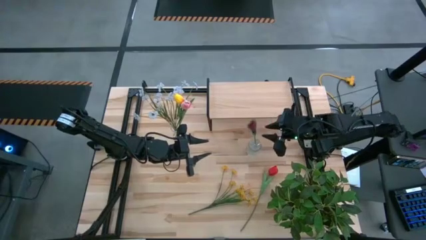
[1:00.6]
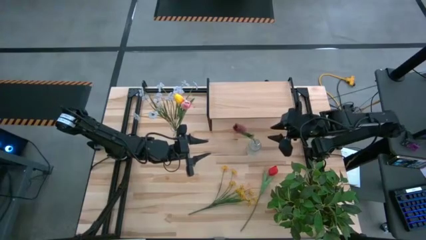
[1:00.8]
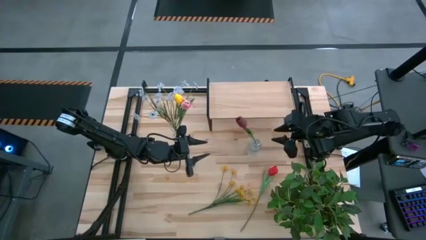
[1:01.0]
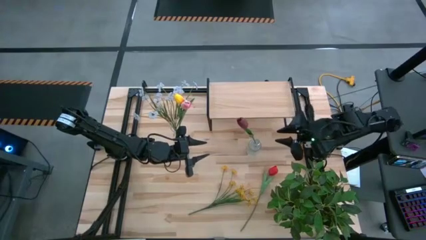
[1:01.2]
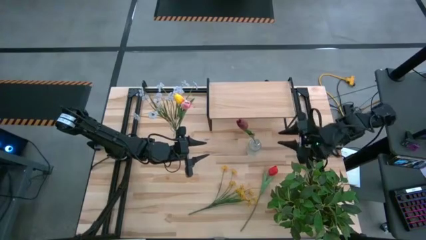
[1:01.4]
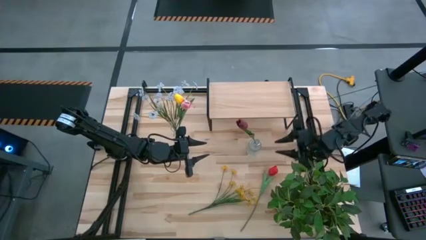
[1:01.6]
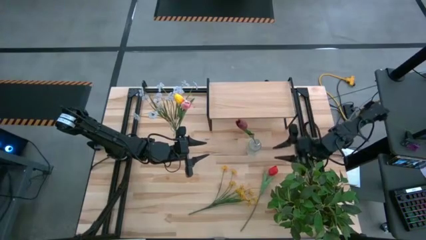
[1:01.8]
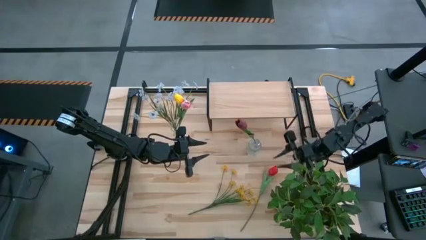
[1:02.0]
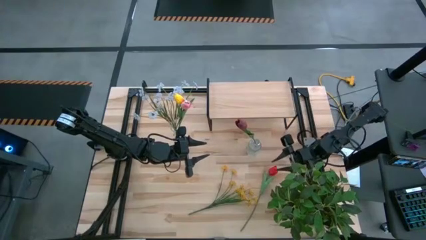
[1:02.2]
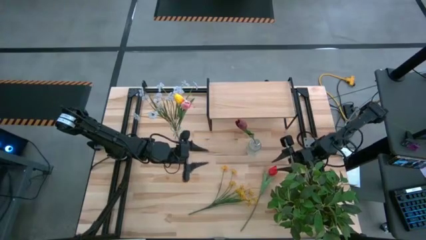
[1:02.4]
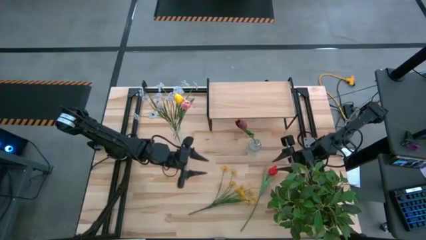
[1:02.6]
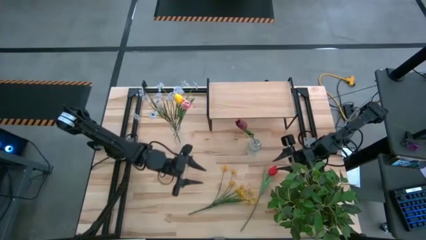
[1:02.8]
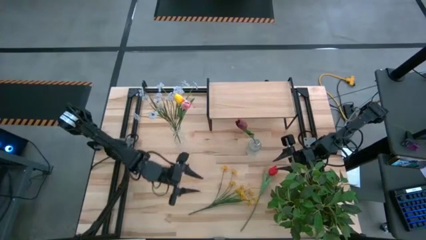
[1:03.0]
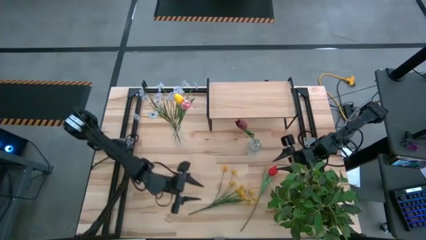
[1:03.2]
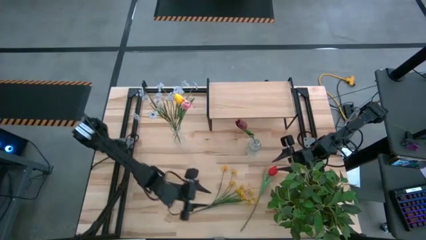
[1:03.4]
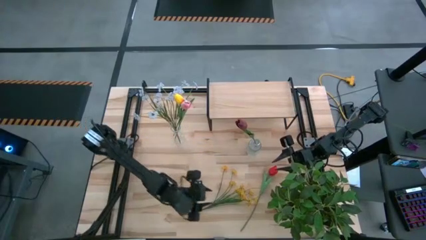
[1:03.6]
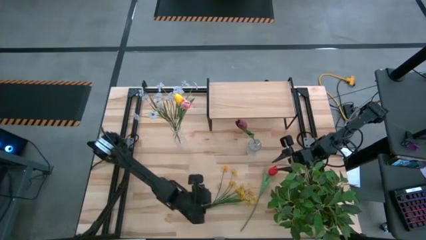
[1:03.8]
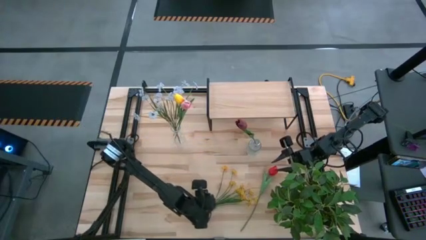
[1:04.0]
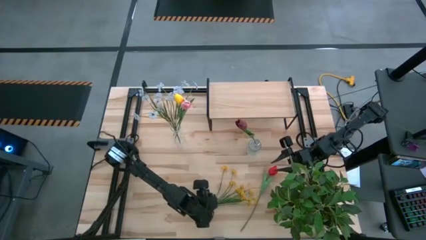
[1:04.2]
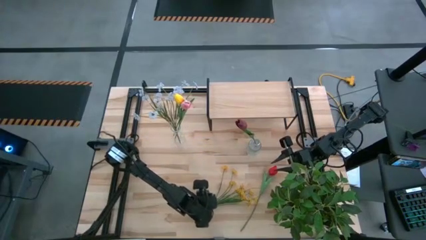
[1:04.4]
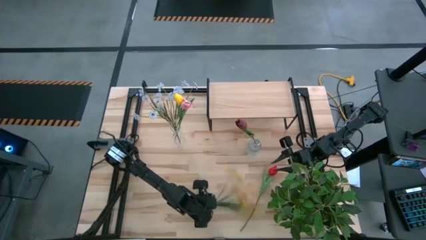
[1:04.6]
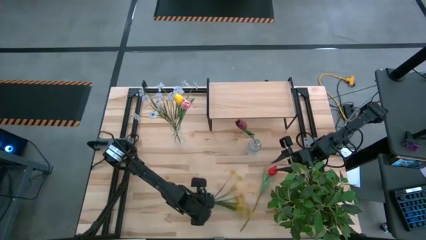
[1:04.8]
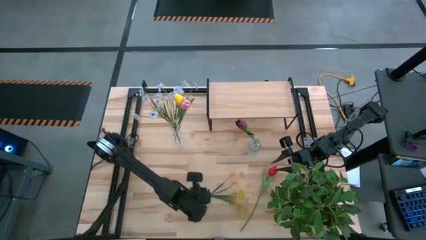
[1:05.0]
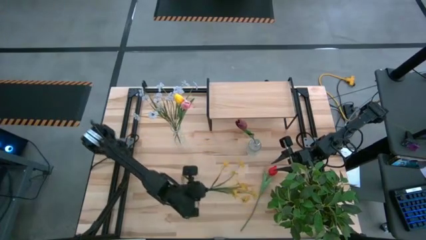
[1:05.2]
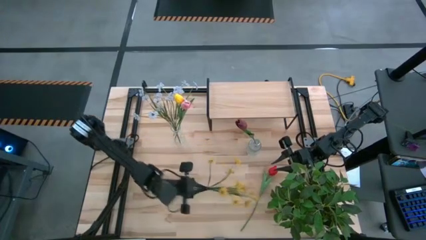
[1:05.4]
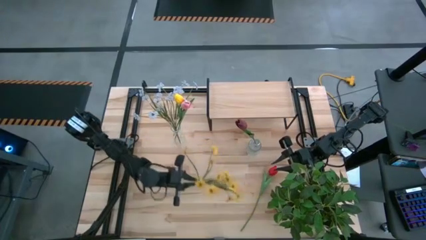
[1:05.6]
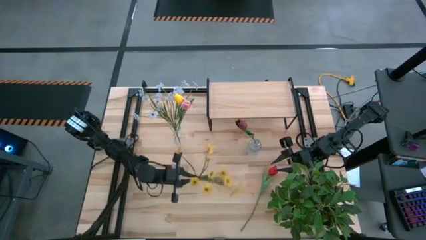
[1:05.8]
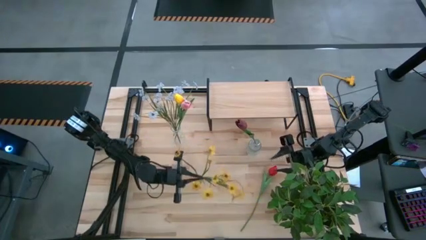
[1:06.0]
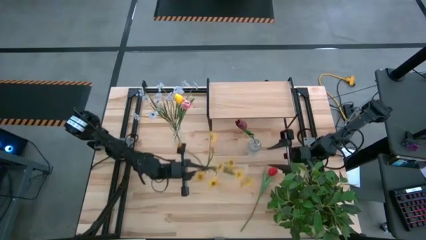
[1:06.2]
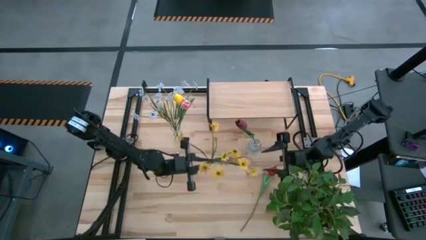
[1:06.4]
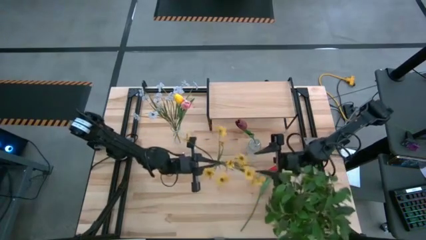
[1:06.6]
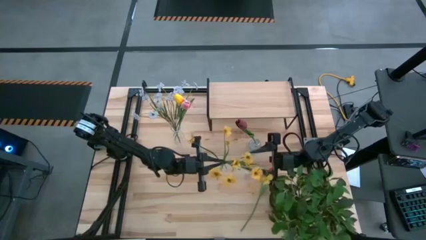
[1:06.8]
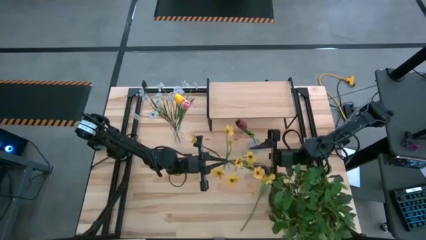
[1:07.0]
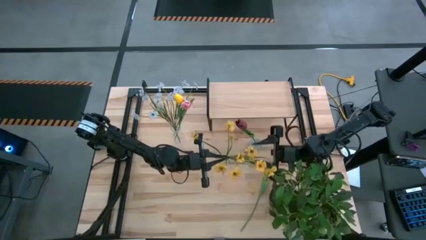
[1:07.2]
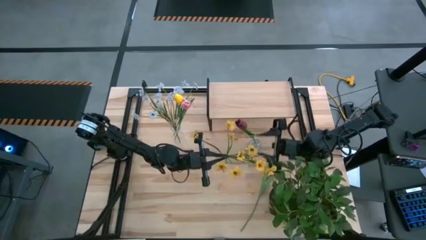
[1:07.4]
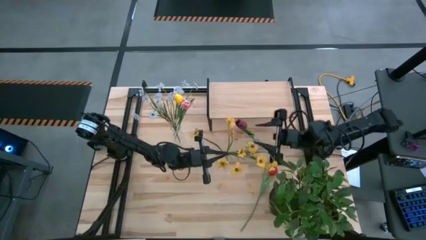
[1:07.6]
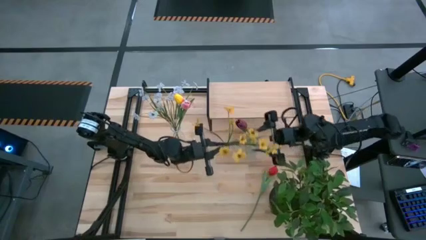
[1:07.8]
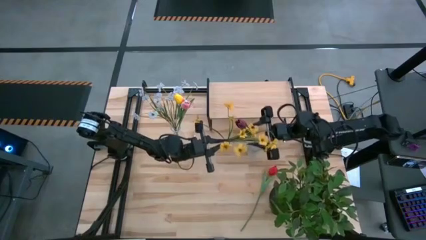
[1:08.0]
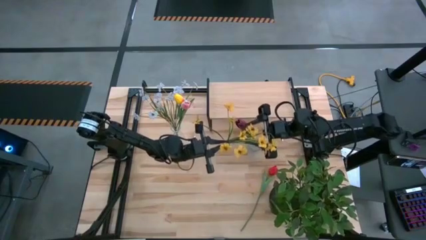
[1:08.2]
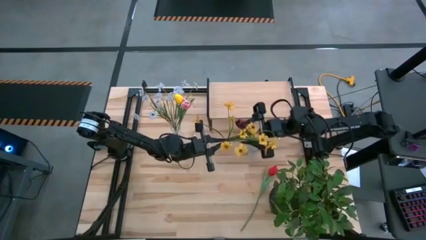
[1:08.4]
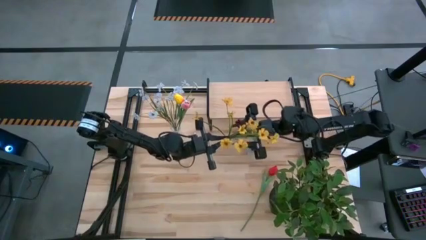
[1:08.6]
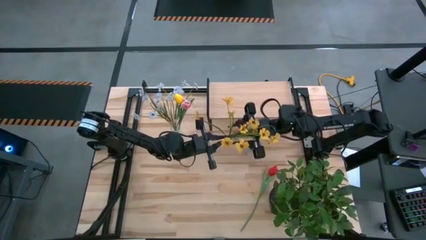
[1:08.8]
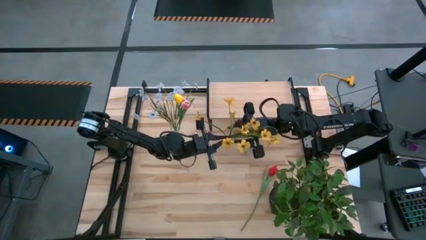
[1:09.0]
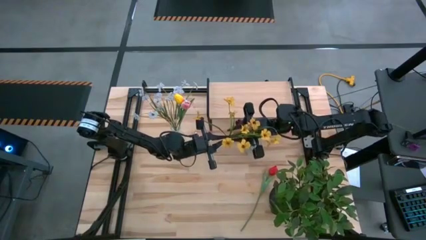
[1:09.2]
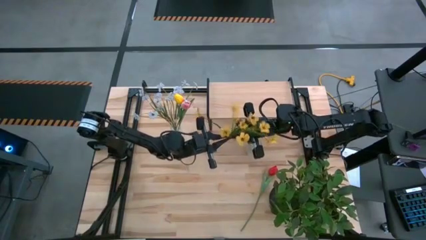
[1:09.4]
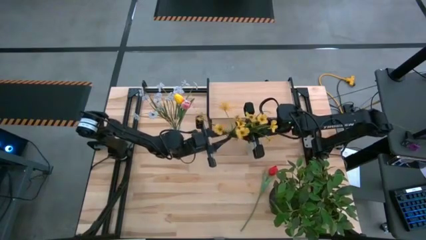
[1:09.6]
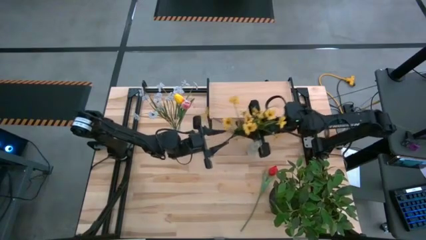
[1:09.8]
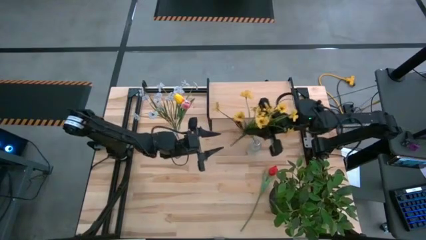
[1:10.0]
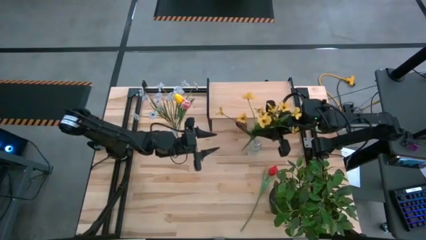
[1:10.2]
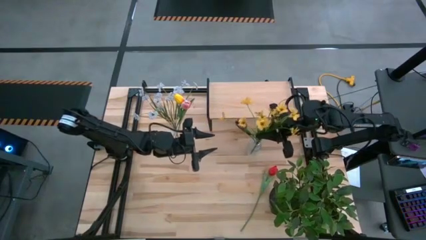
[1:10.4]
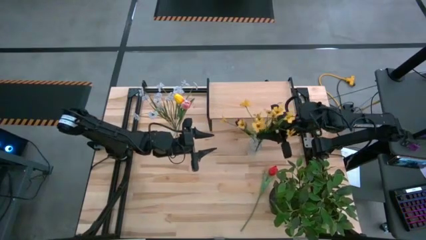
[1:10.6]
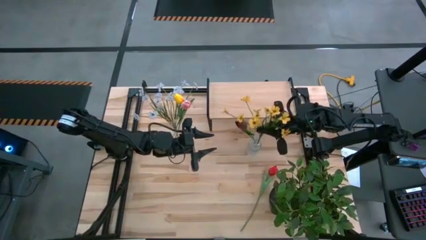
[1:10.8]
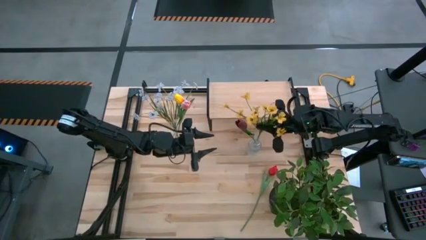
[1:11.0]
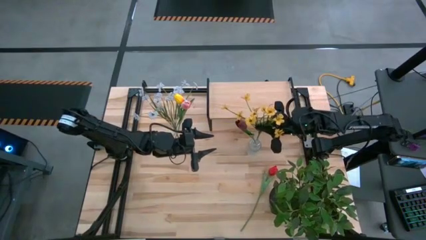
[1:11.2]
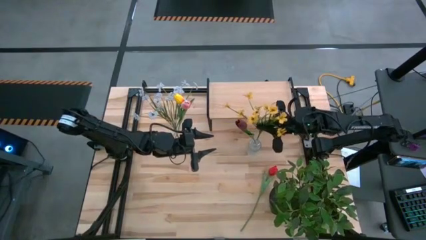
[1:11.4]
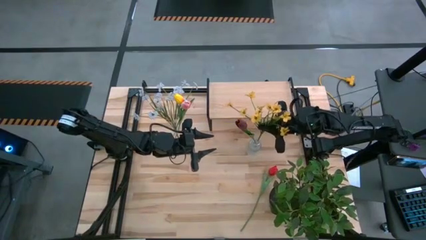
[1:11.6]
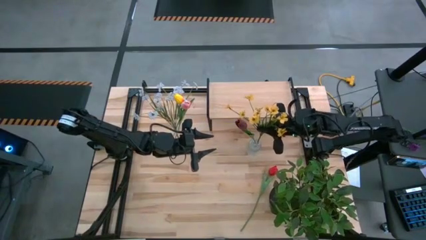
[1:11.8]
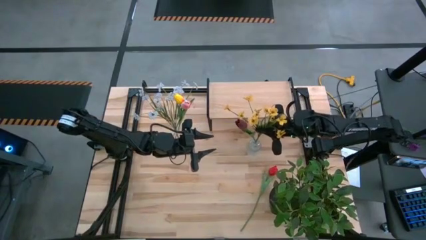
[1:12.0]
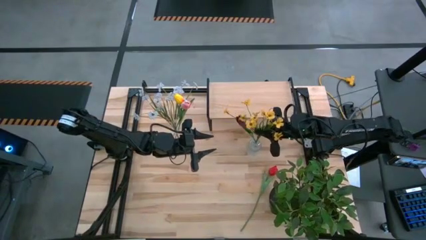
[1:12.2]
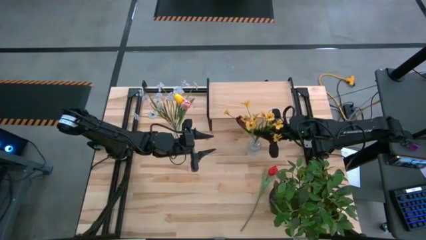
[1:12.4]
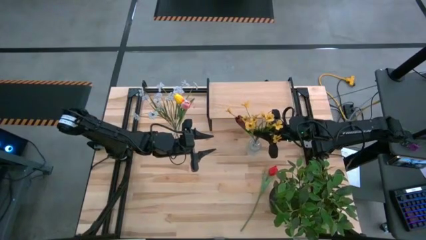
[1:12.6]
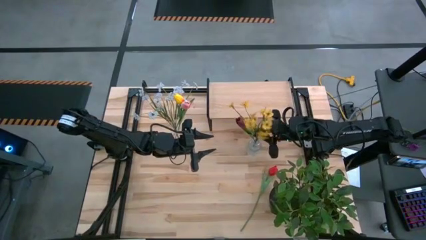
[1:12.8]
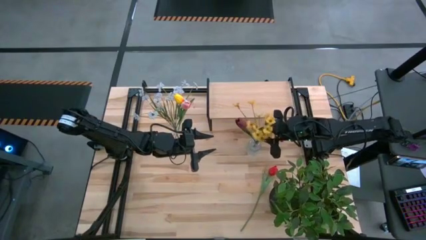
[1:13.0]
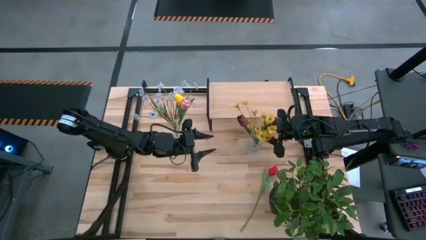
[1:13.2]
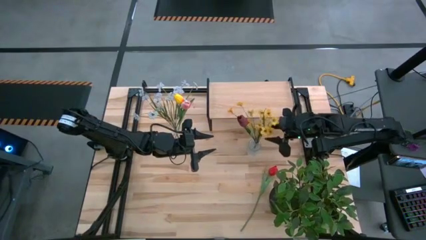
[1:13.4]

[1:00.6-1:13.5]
Task: Pick and place flowers into a vace then onto a shelf
Put the yellow flowers into the right transparent vase

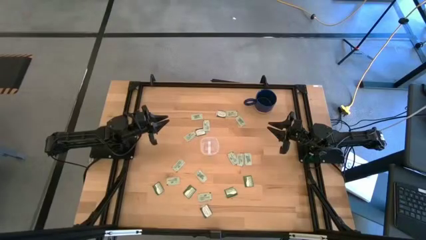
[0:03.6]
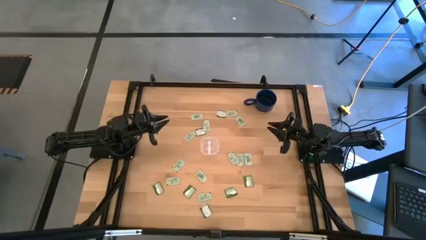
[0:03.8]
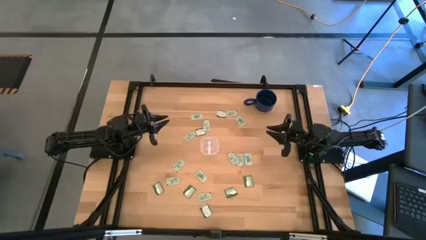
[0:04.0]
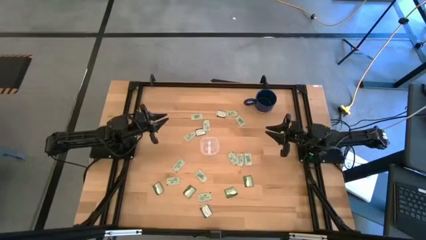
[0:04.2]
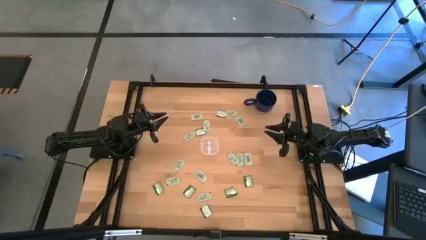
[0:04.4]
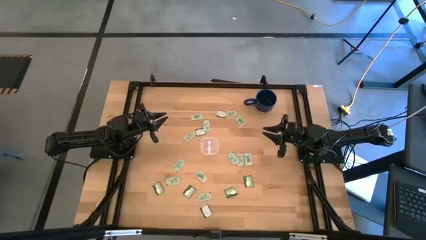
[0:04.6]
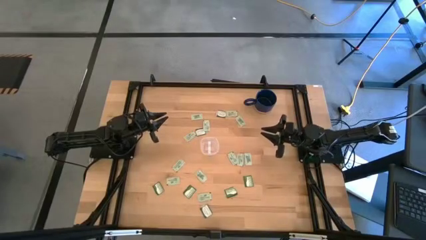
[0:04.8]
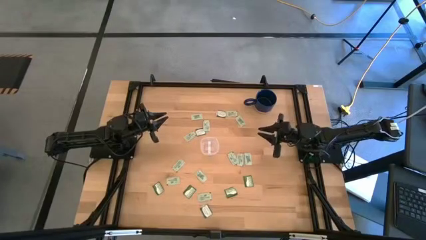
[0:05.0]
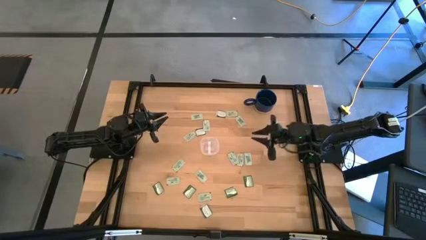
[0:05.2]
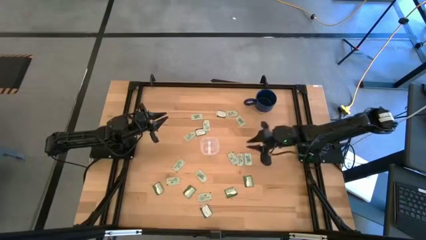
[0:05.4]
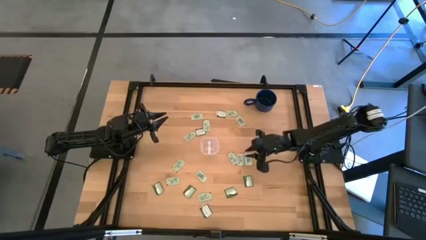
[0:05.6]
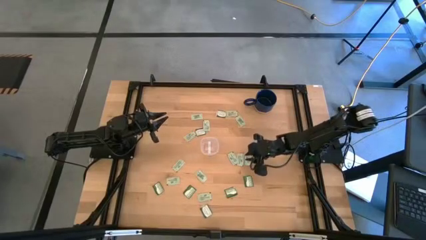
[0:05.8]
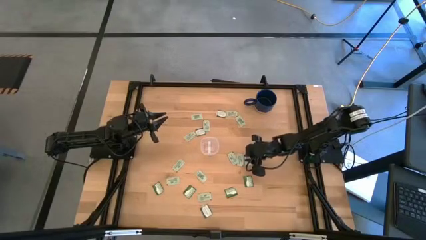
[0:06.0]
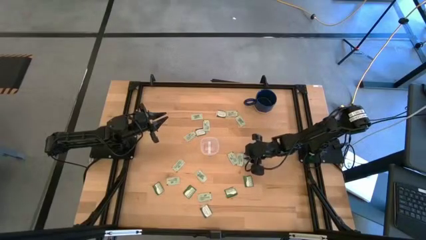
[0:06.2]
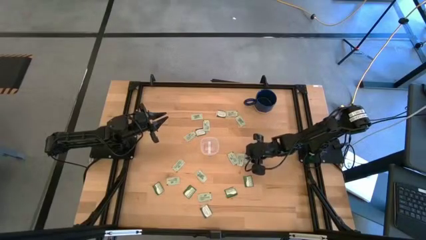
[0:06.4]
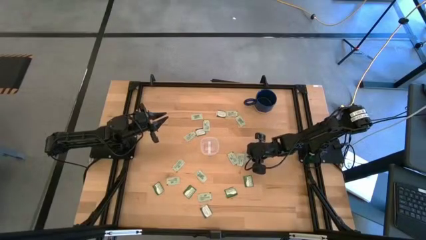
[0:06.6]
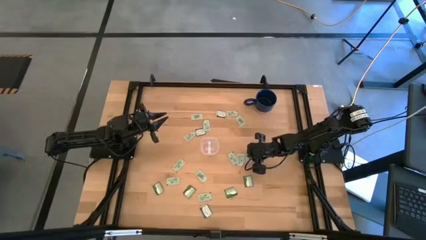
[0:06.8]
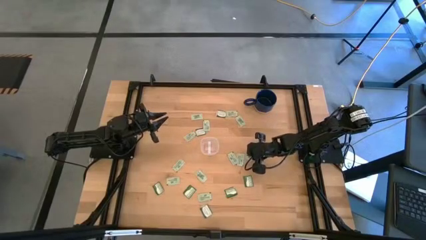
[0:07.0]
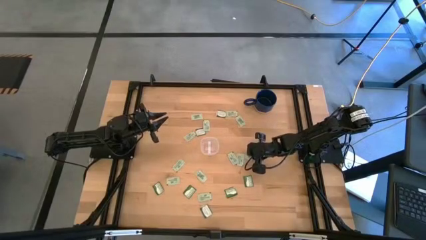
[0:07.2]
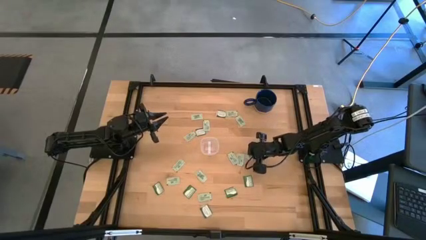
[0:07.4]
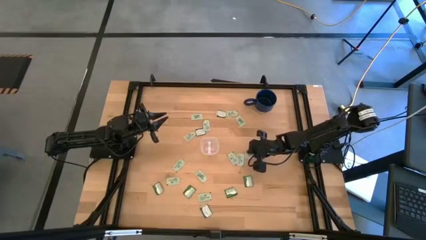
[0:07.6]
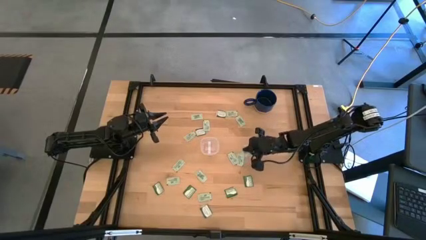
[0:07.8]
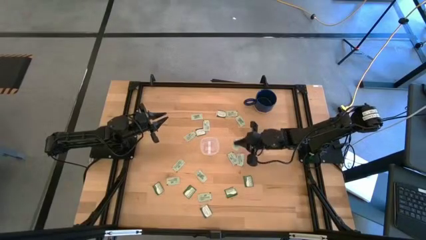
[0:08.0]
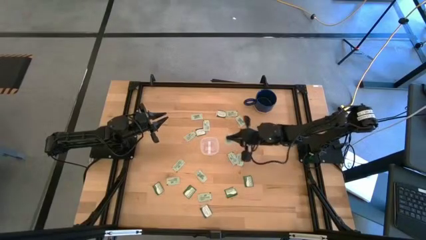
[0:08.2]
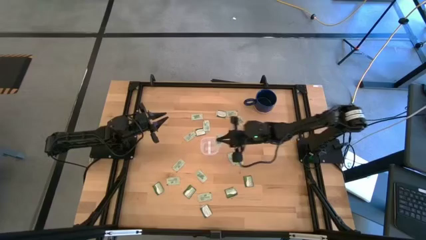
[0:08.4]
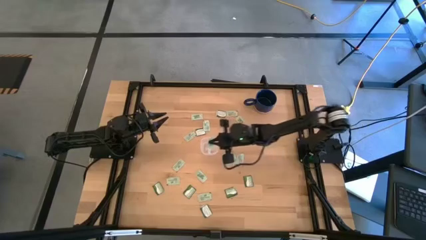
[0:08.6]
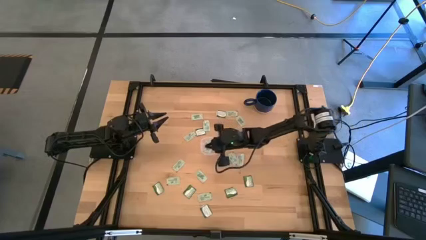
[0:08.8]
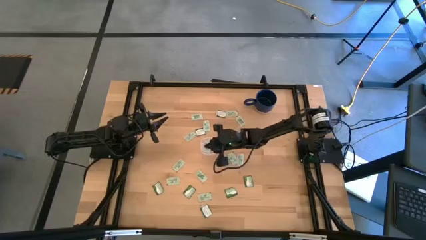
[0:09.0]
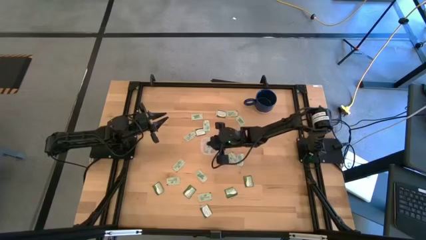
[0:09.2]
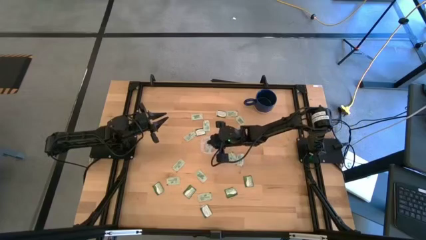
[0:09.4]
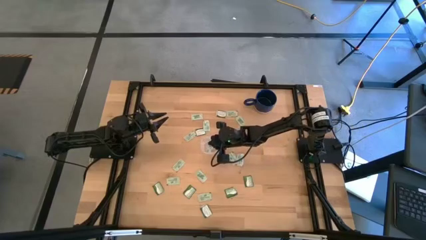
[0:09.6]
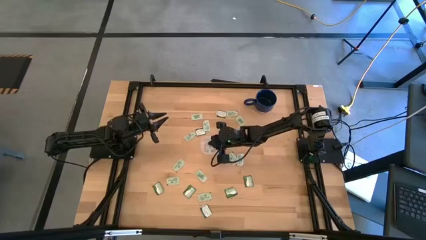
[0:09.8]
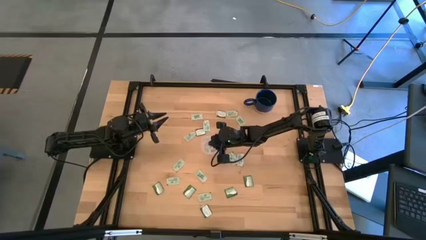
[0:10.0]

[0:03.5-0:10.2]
Task: Pick and place Stevia / Truvia into bins
Put the light green stevia packet into the container
